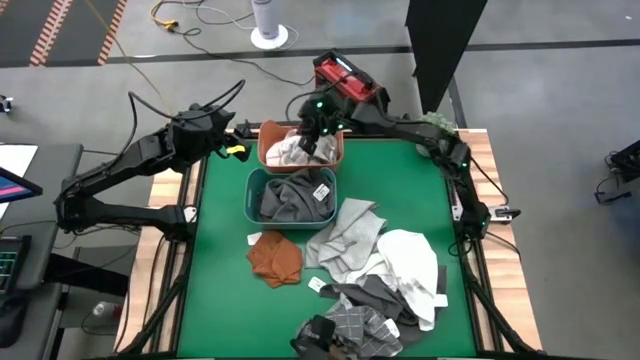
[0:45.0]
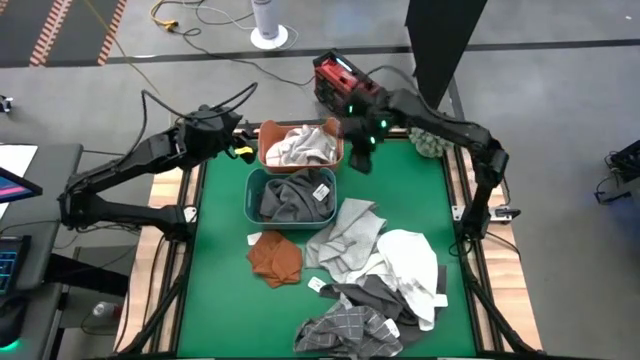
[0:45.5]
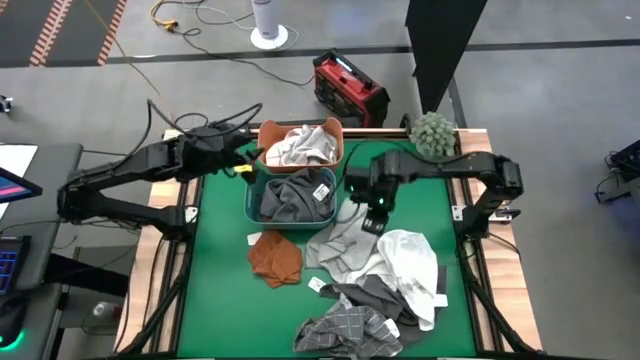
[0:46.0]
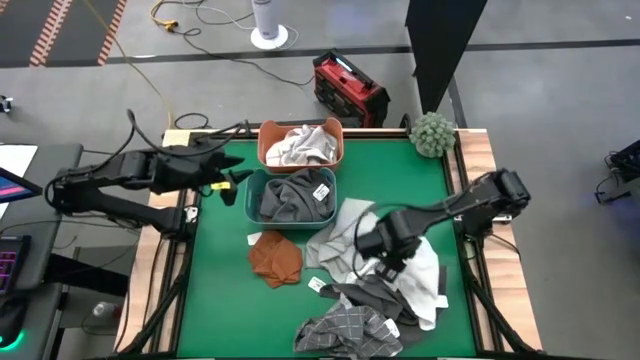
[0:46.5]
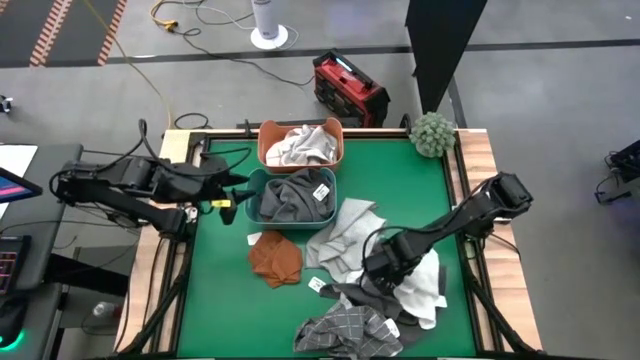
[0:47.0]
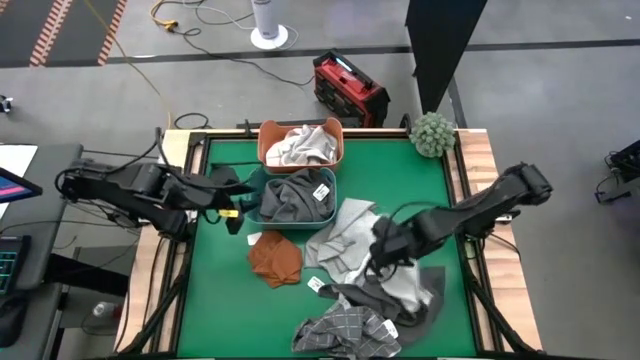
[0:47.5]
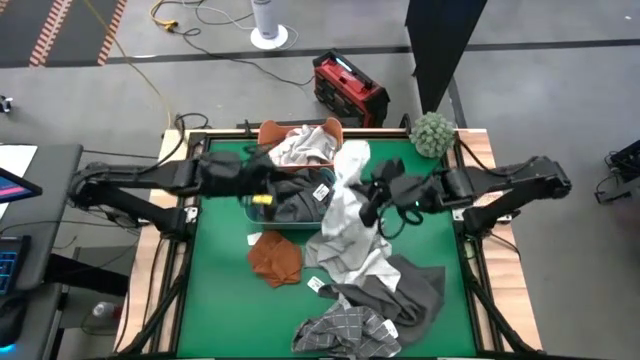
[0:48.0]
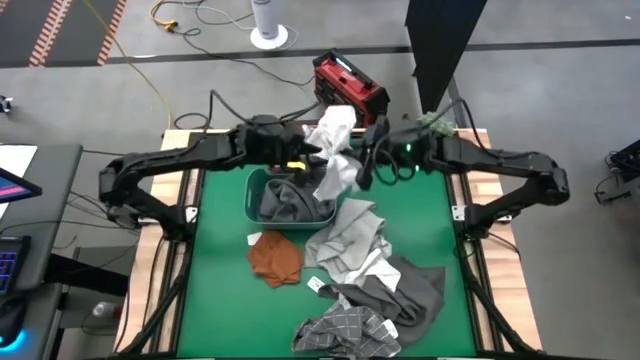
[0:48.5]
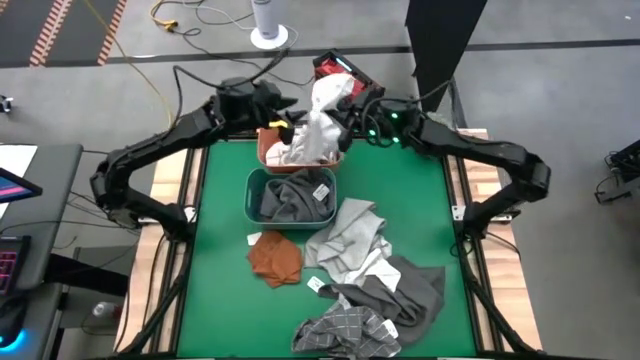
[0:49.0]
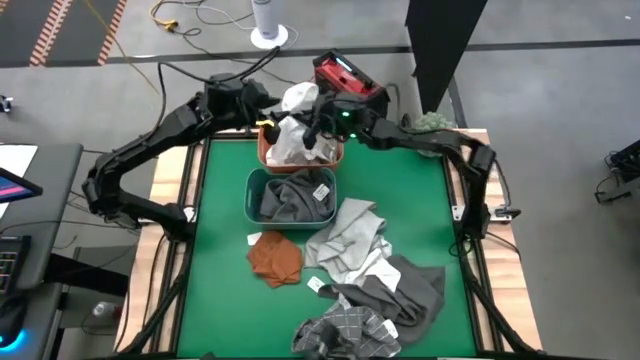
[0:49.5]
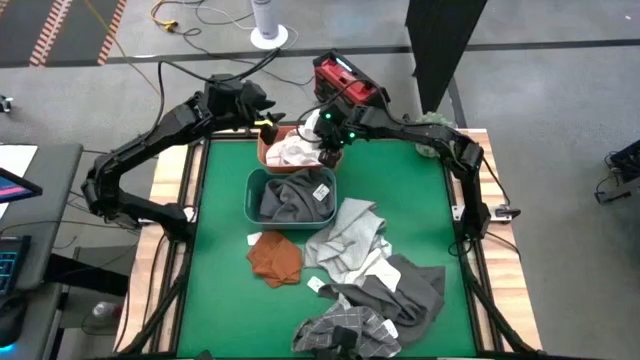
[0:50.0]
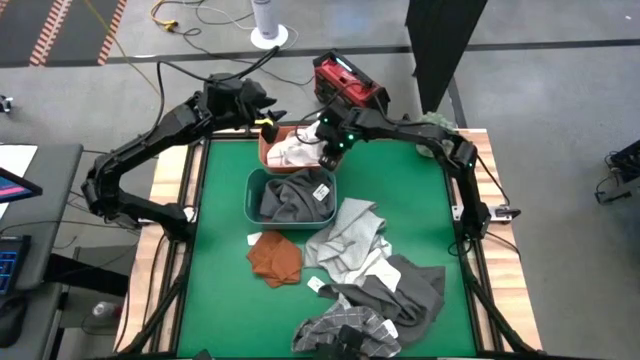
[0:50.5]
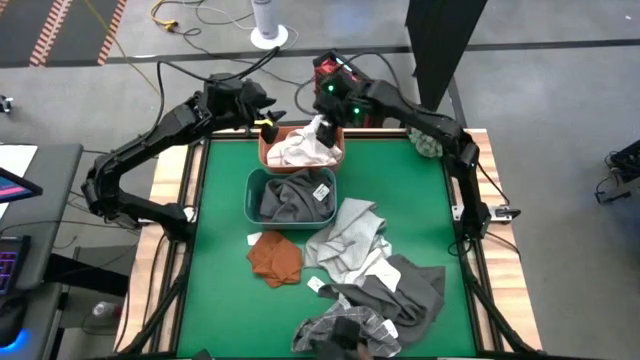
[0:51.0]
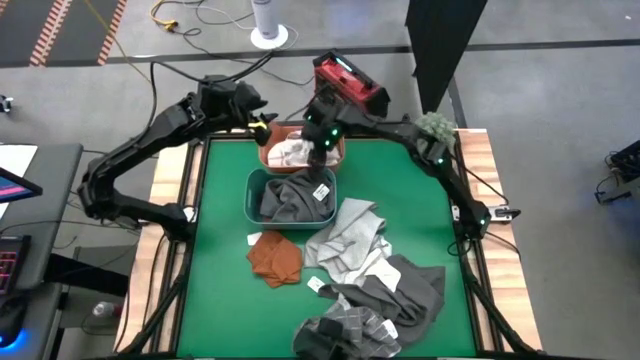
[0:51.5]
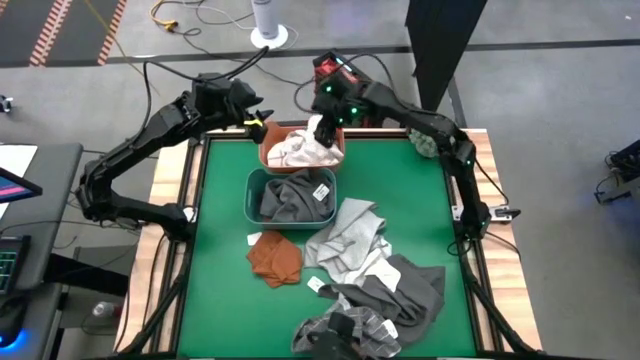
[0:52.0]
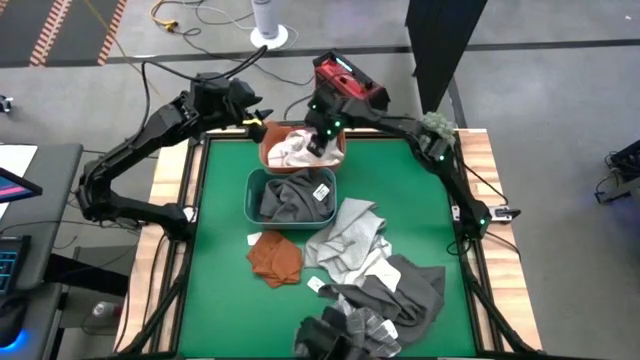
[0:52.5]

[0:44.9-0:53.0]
Task: Sort towels by color in basket
Put the white towel into the orange bin

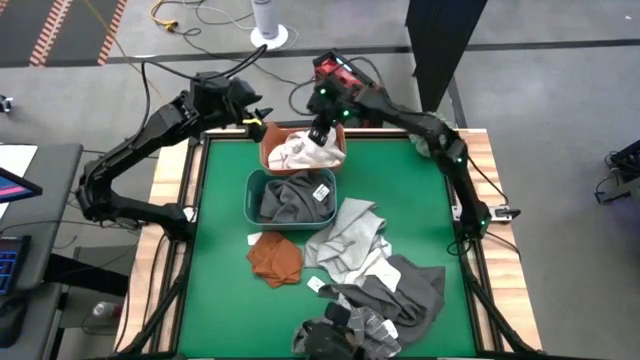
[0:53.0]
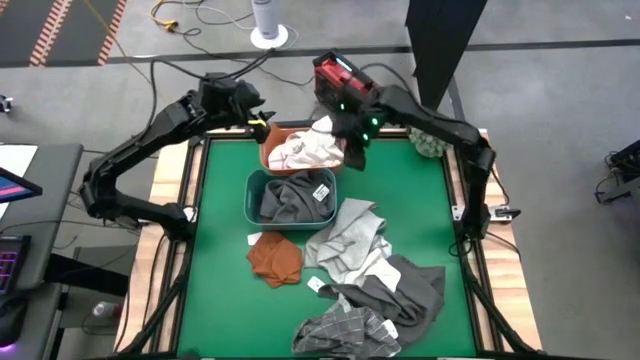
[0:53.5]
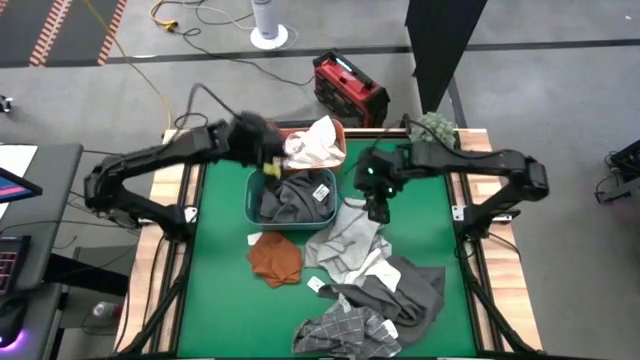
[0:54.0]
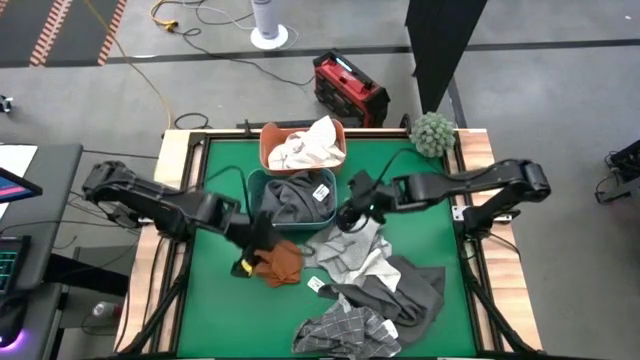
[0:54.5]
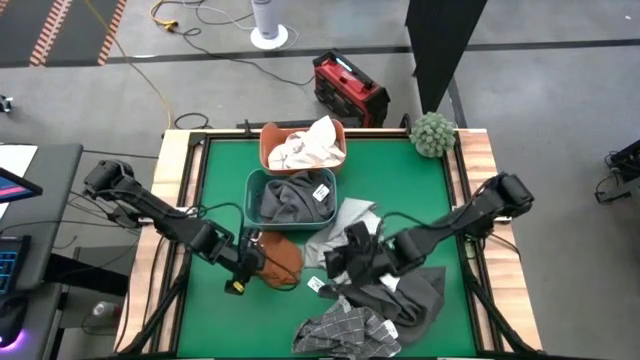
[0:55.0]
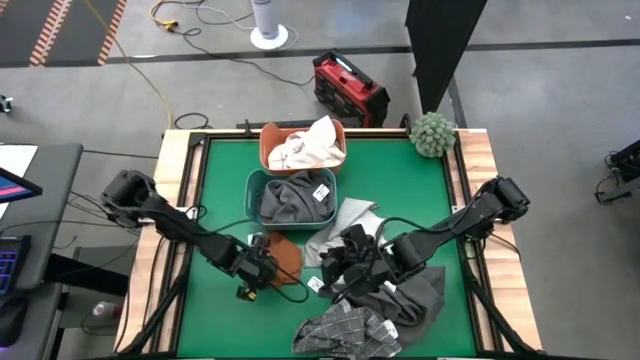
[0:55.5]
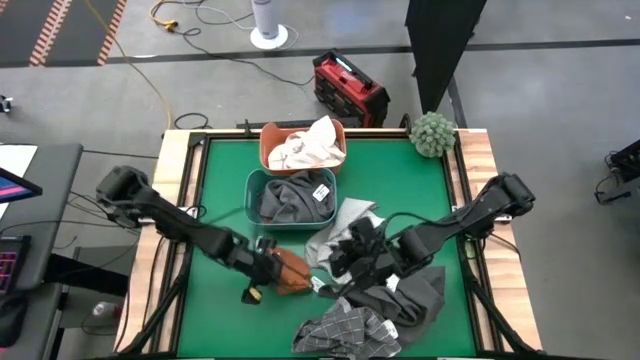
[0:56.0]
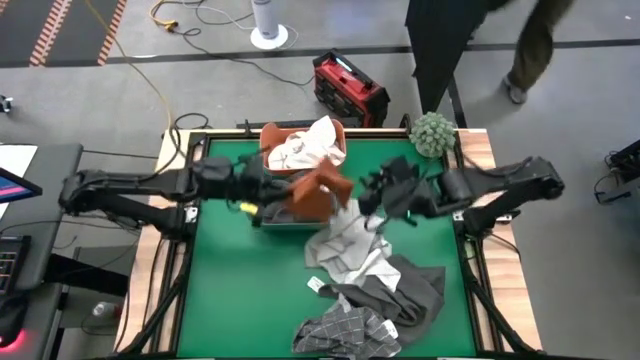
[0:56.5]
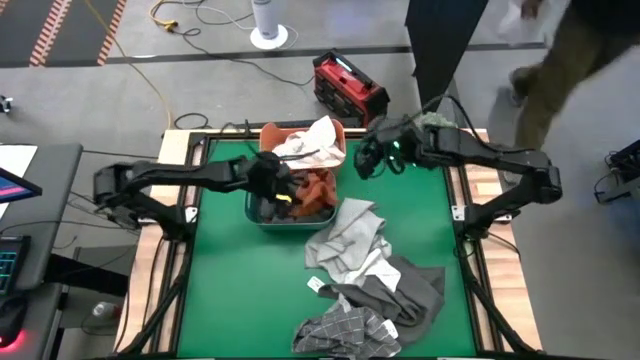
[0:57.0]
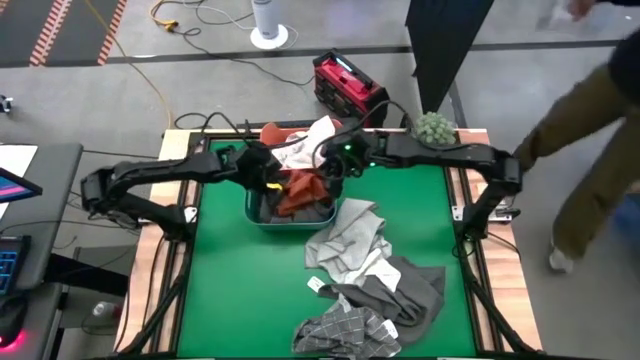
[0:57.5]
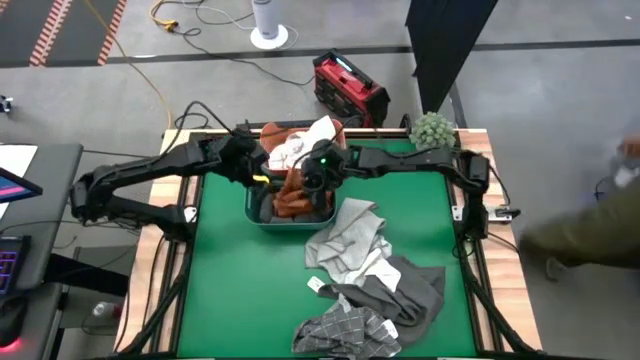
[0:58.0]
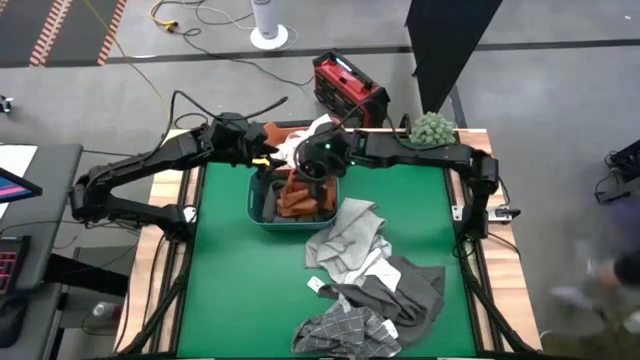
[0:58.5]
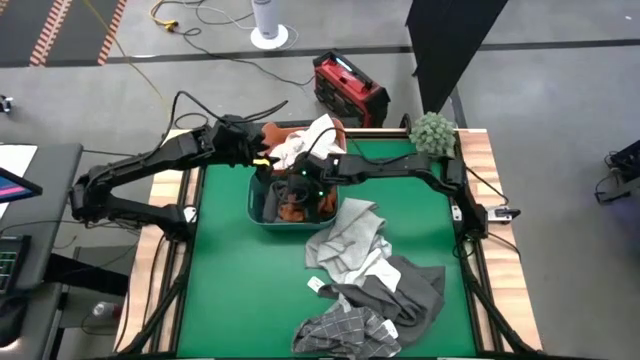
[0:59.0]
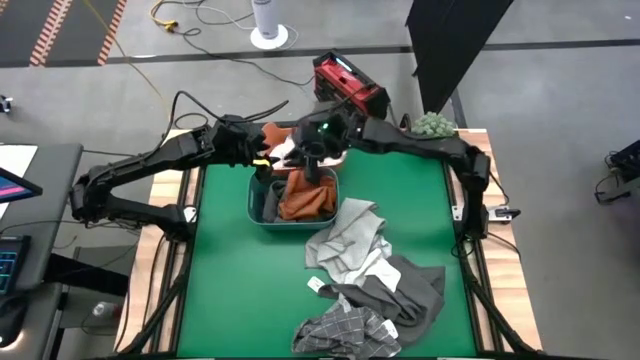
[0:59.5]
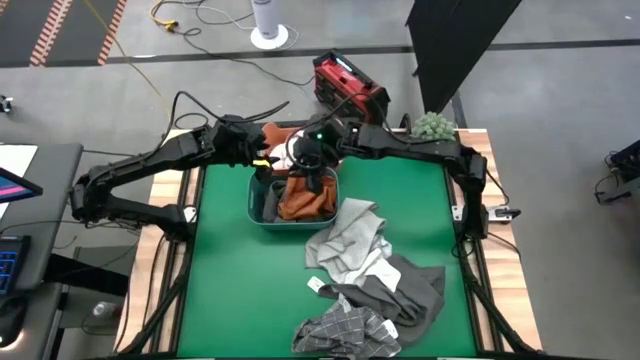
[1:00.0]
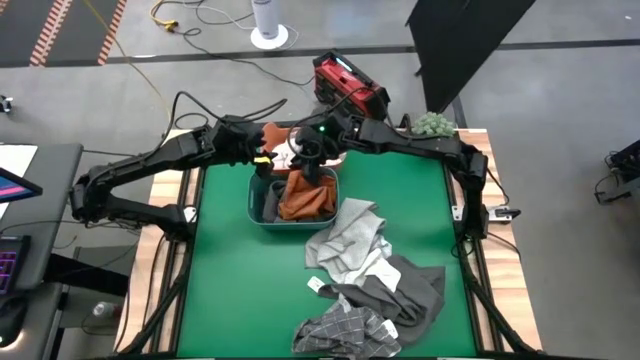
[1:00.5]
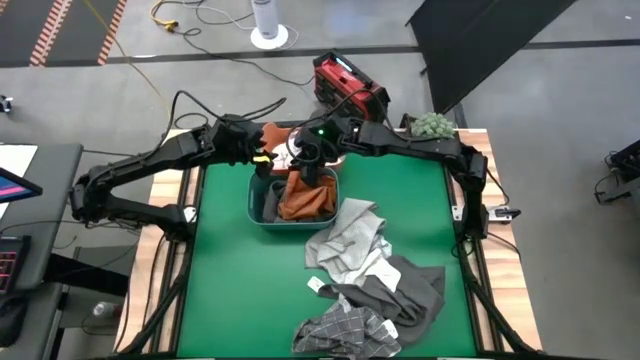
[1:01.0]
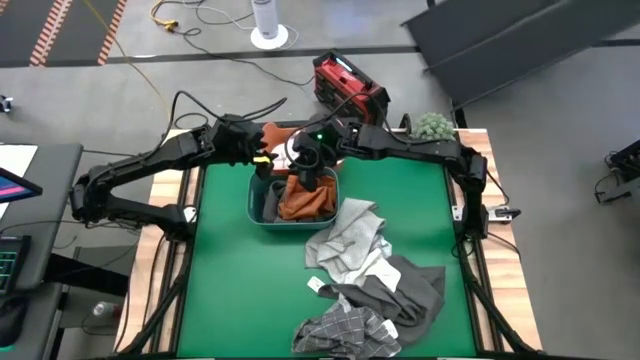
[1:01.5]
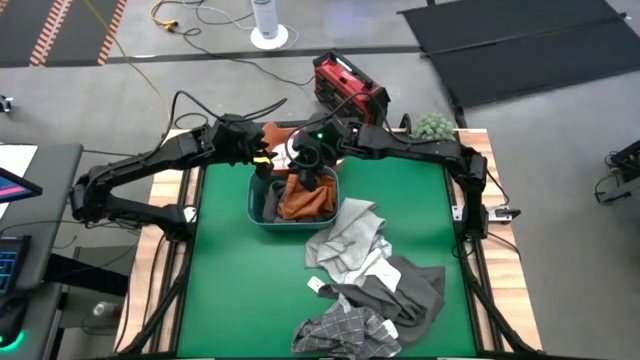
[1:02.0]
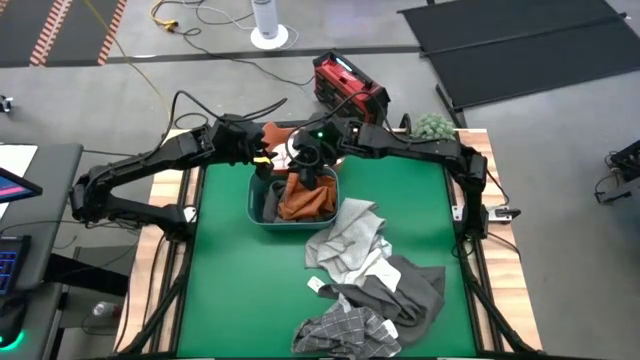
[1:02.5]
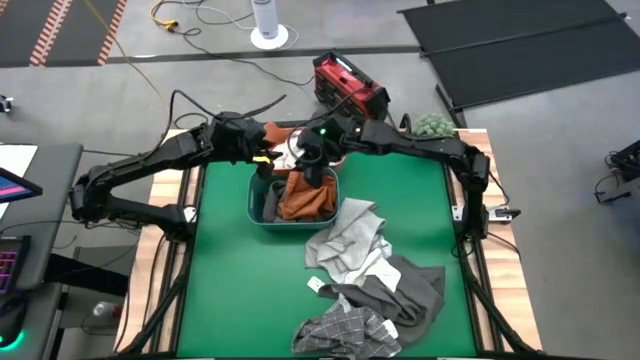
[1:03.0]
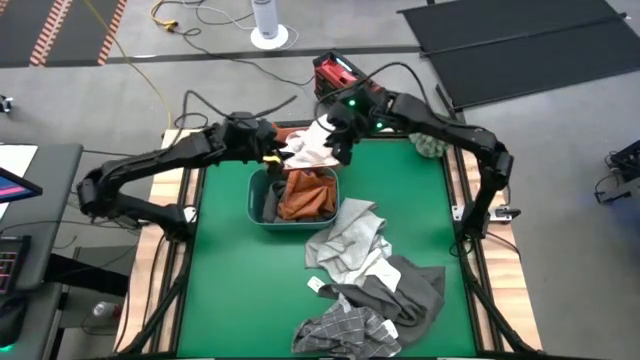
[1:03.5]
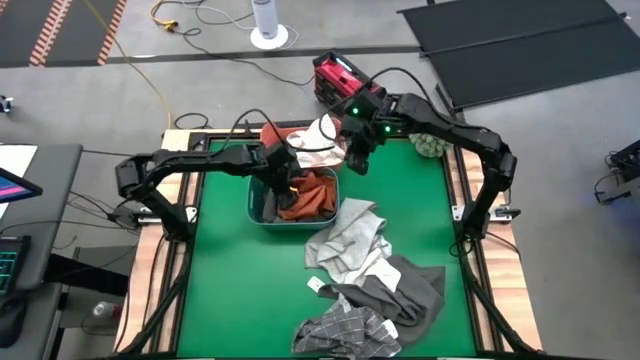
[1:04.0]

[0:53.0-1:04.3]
Put the orange towel into the green bin

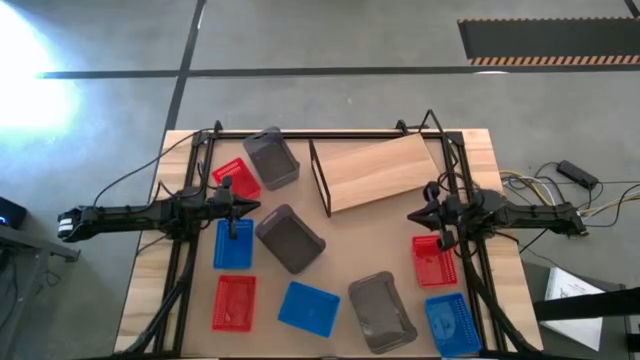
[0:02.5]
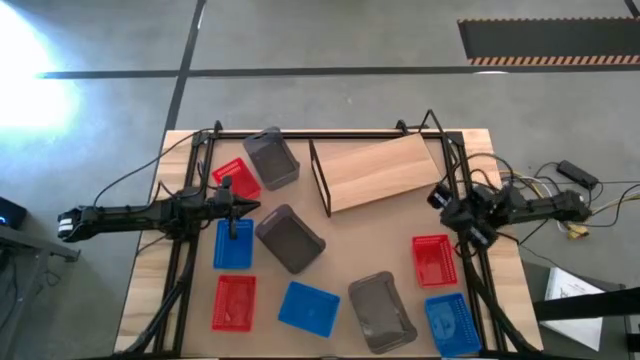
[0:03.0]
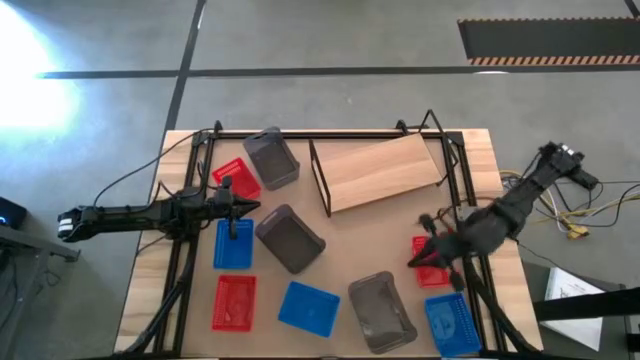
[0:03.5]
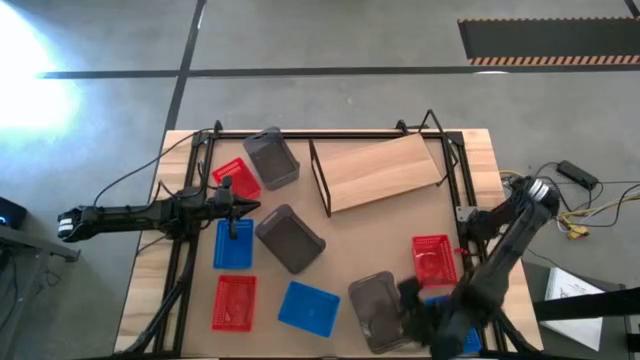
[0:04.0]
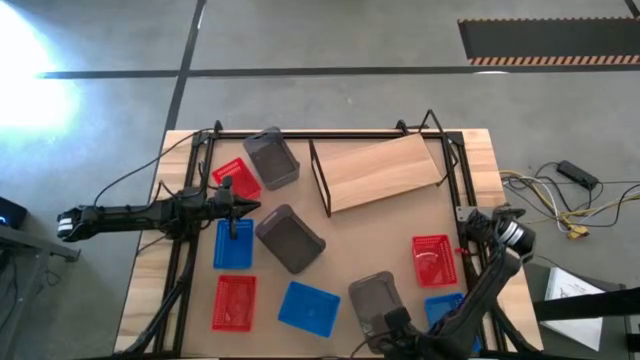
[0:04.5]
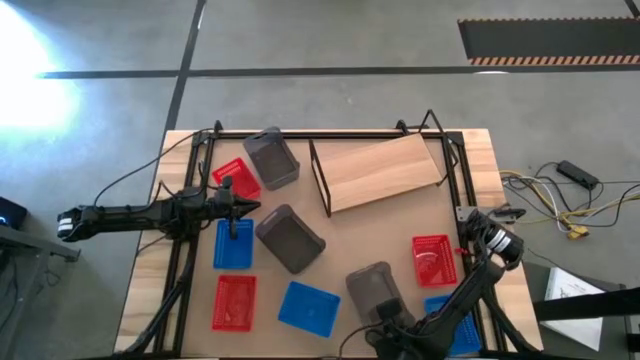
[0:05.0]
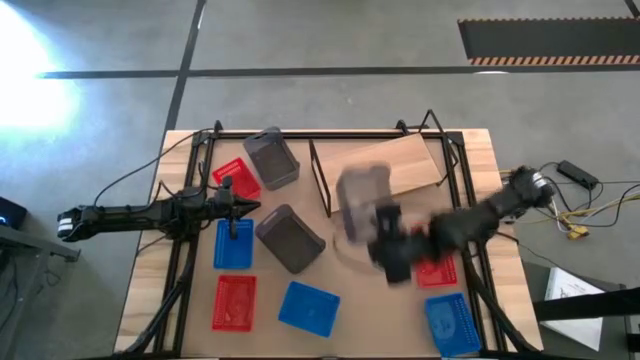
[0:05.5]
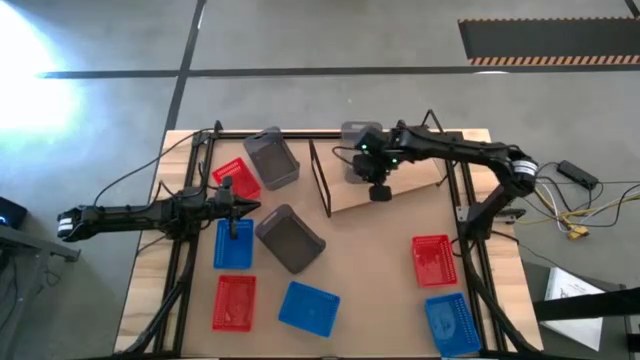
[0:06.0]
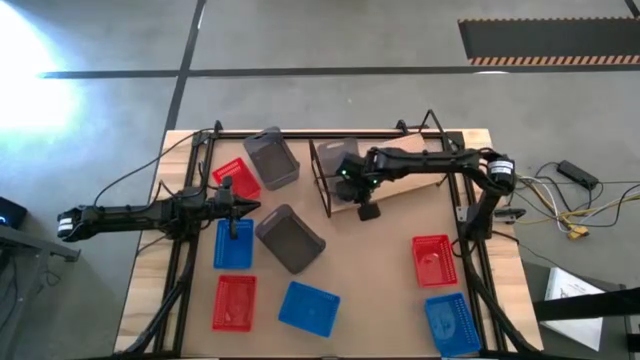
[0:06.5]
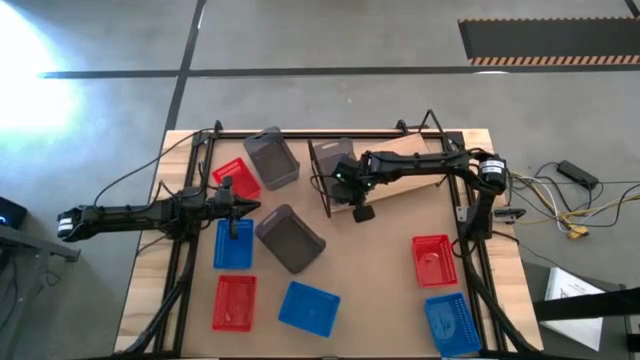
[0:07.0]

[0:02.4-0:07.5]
Task: Stack baskets on shelf by color
Put the bottom black bin on the shelf
